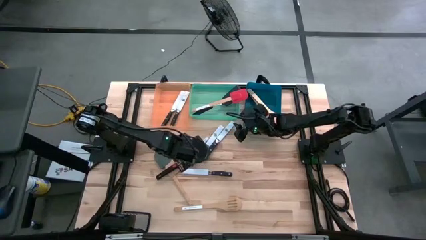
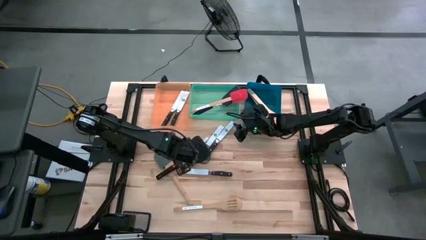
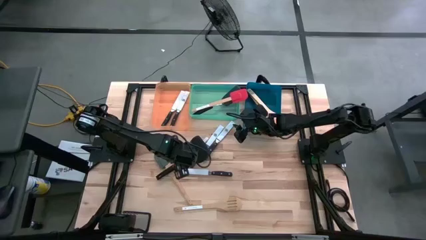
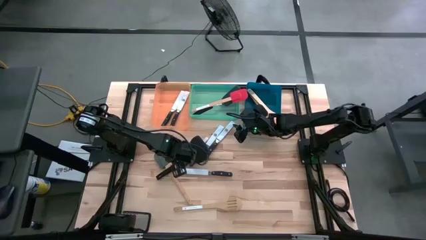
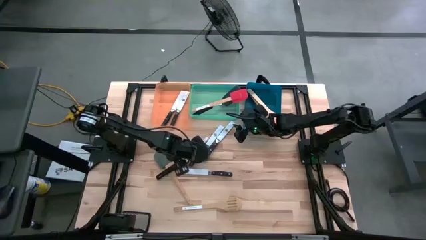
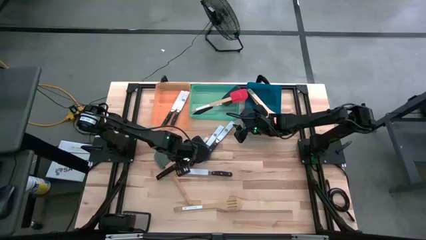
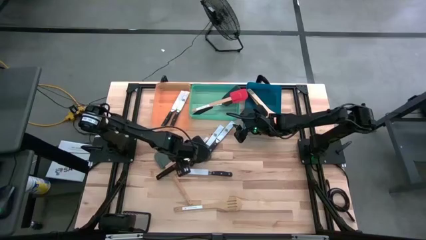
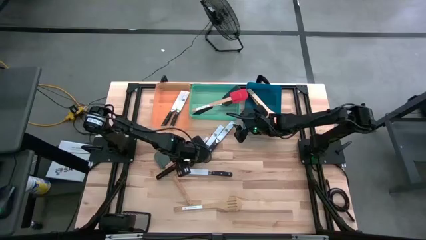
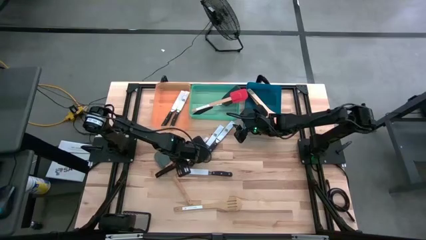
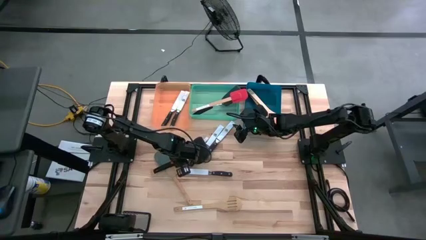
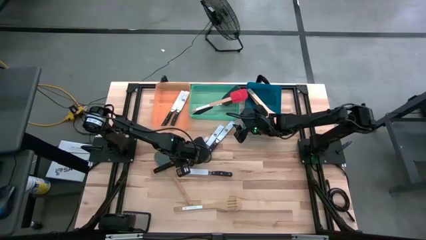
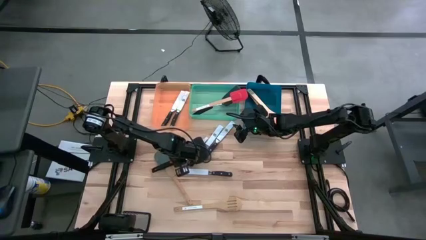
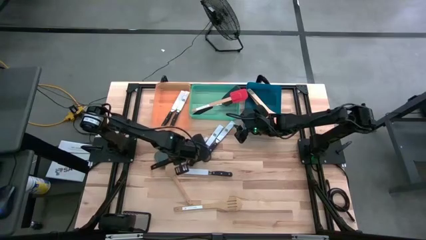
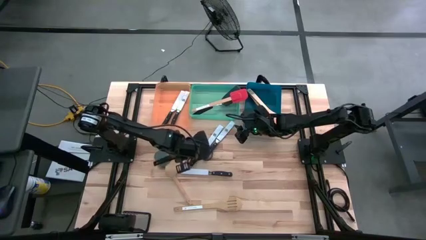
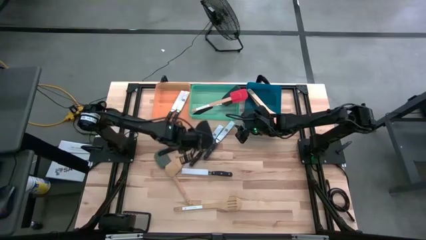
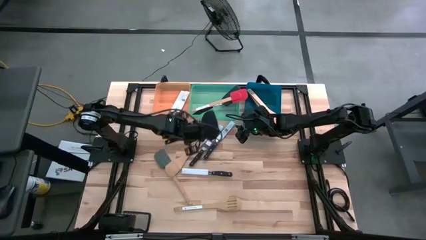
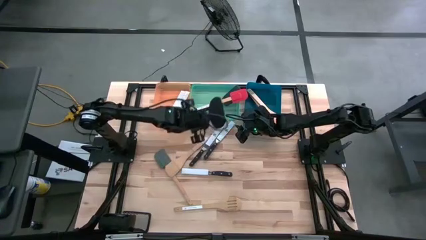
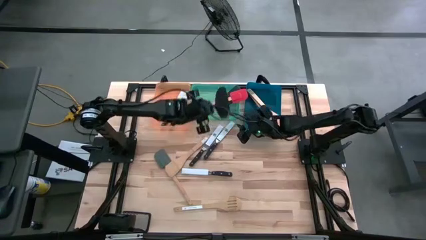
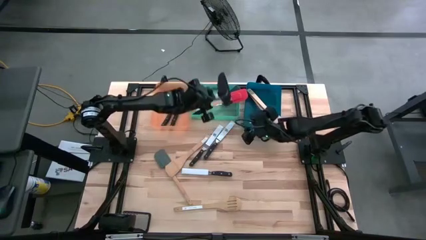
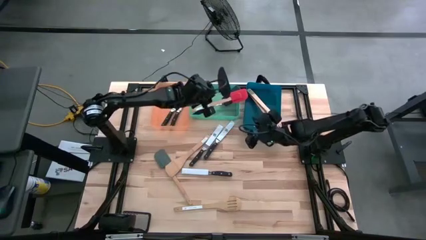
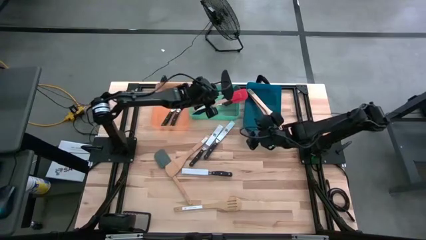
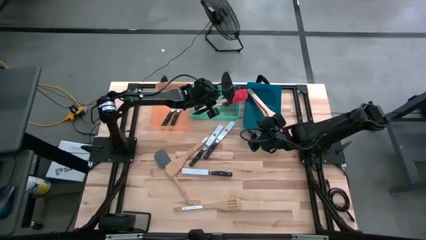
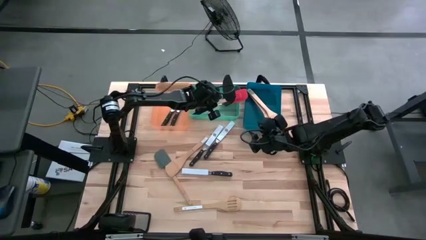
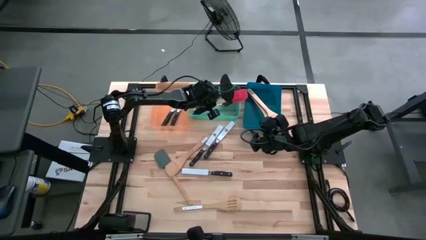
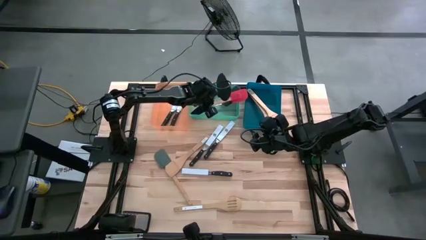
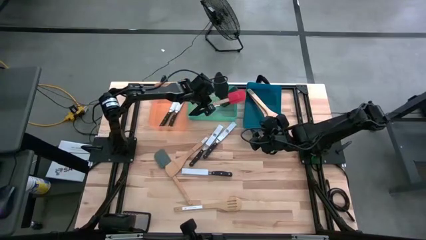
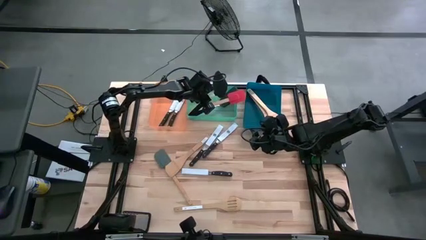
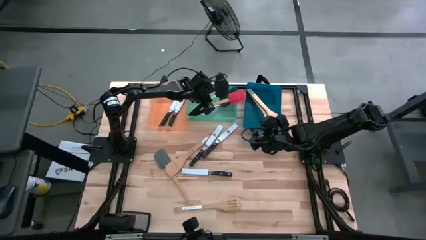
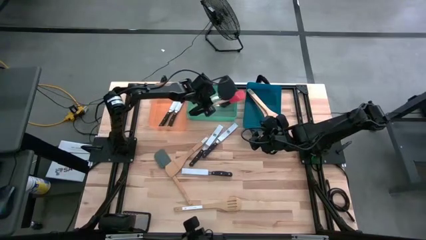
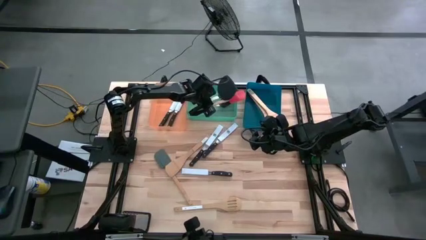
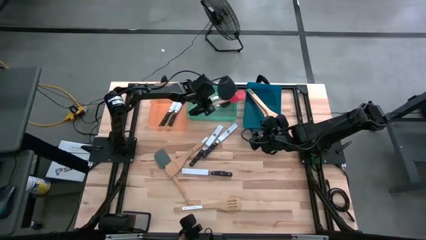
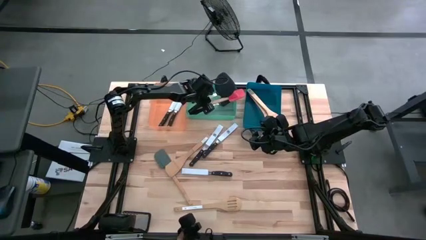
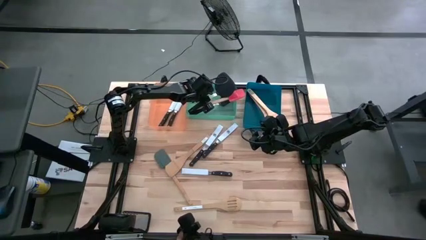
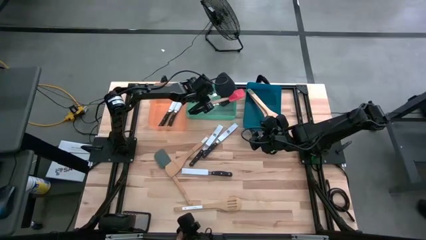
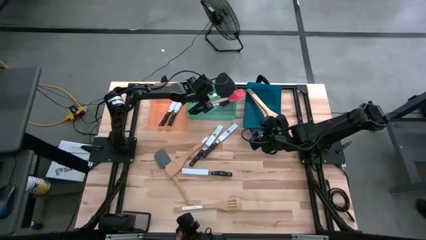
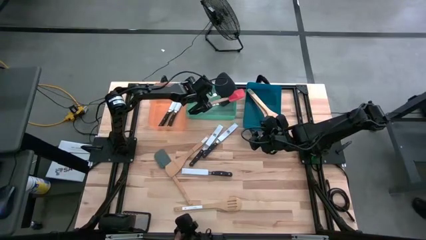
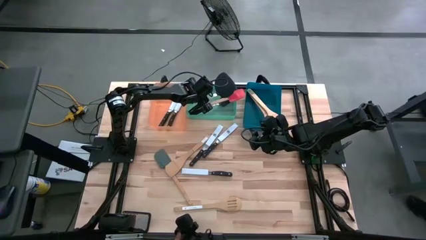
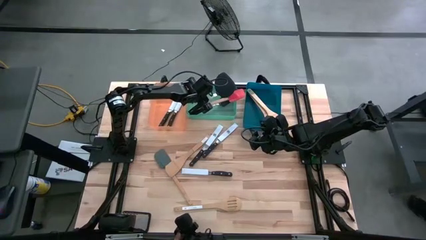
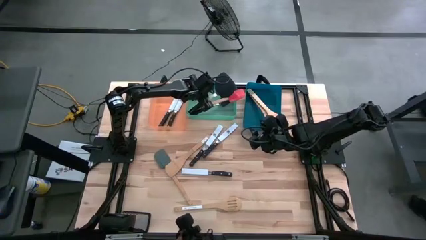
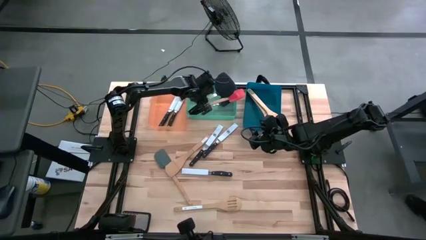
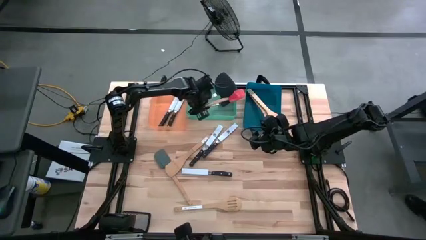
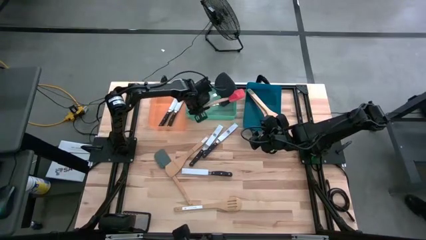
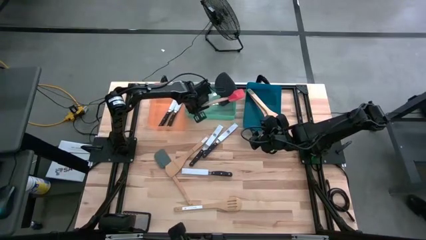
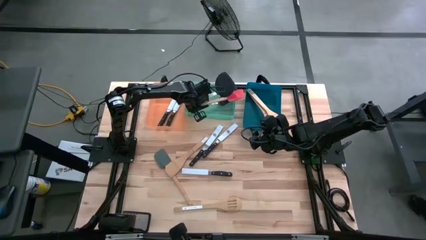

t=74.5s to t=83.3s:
Task: Pick & Place Kitchen Items
Put the black spatula into the green bin

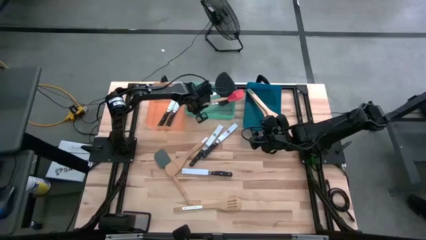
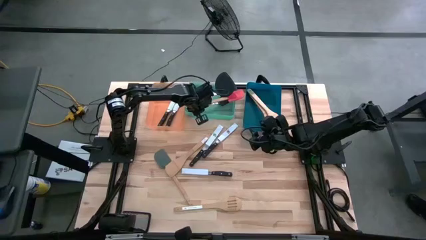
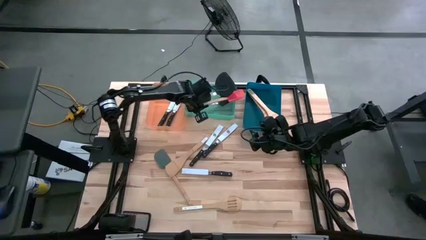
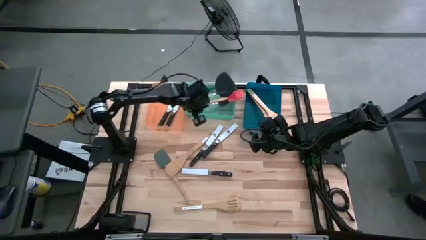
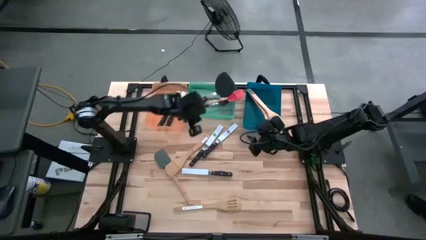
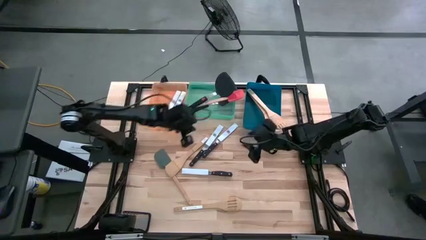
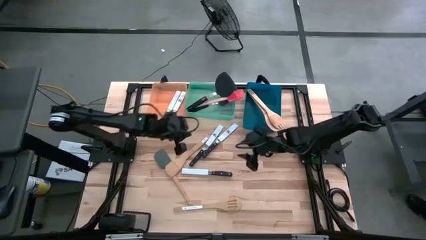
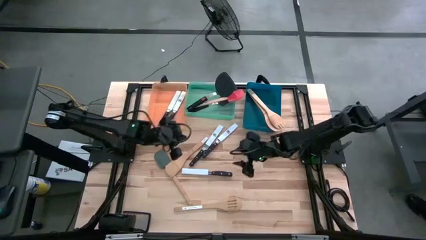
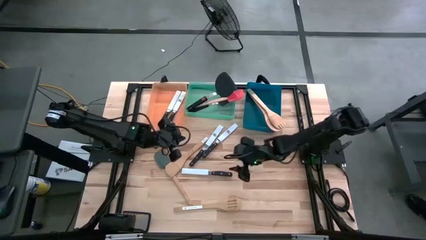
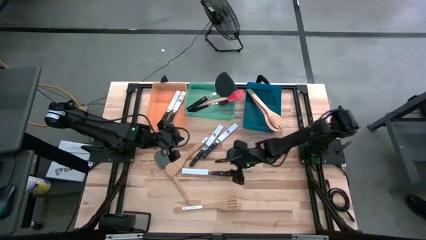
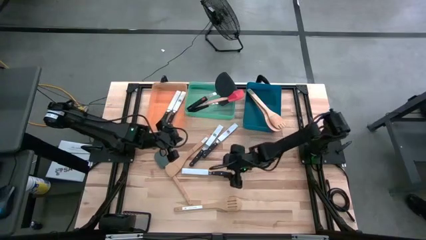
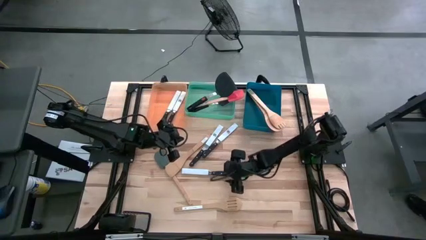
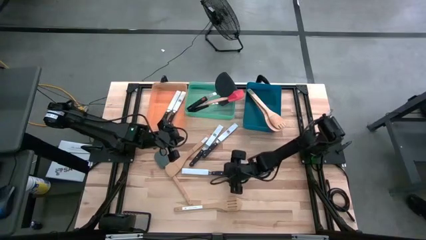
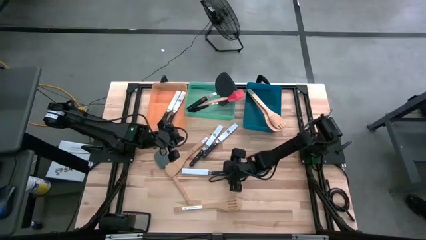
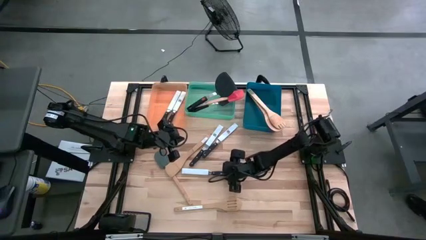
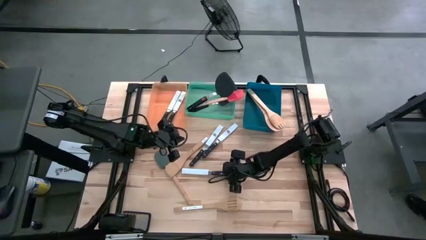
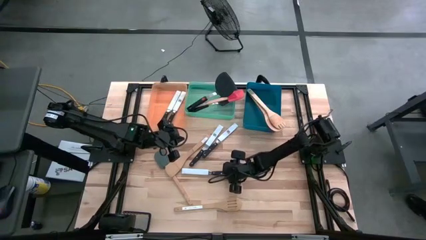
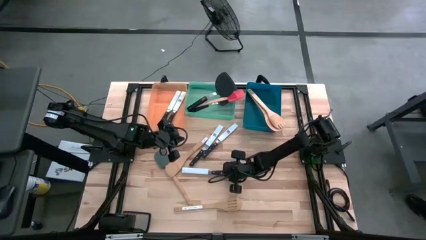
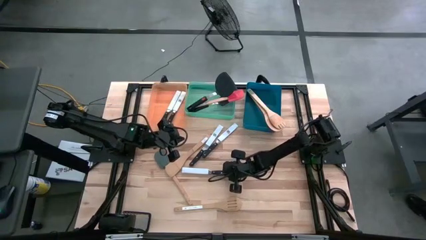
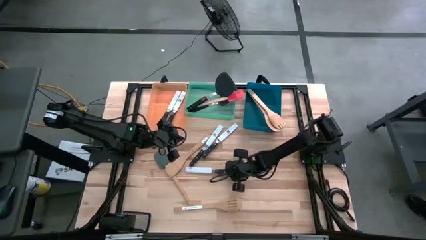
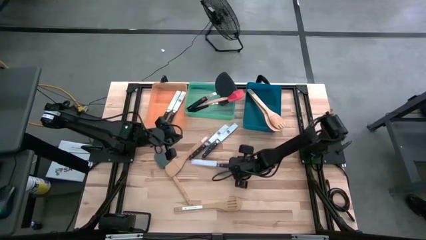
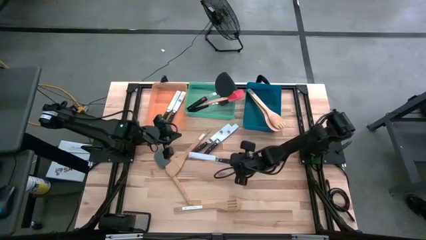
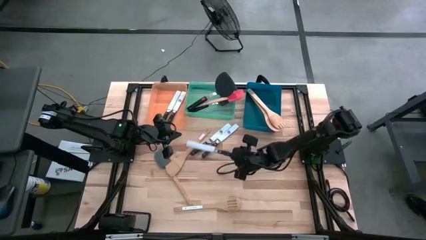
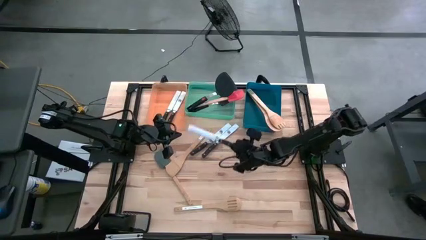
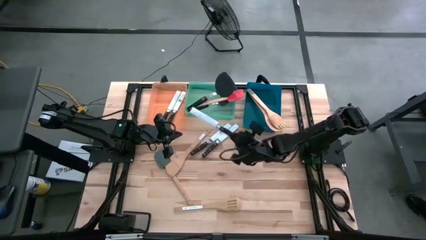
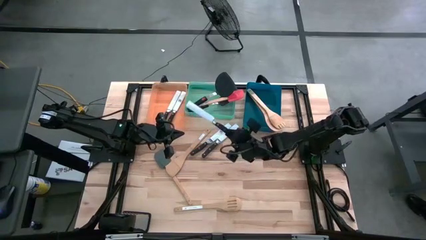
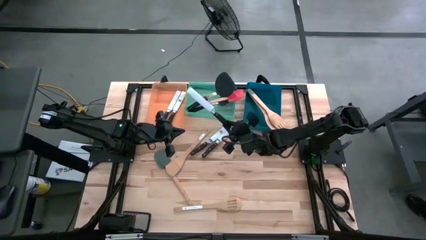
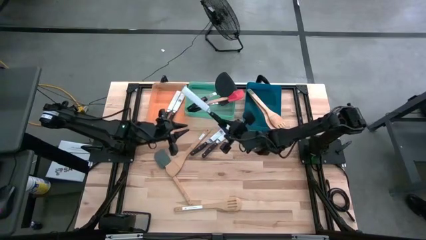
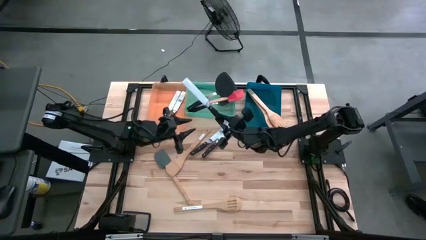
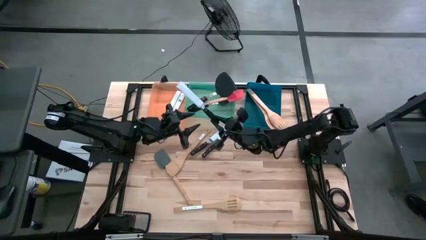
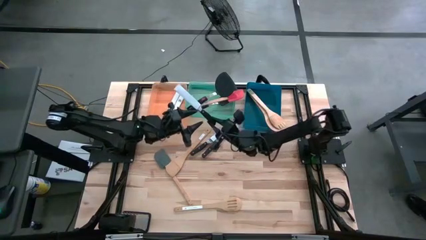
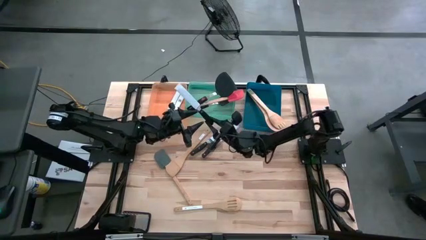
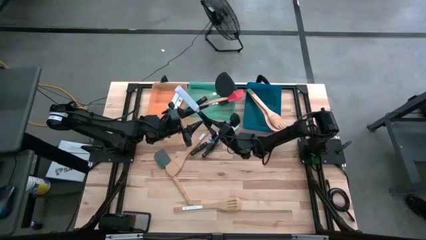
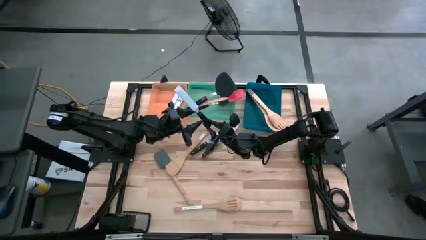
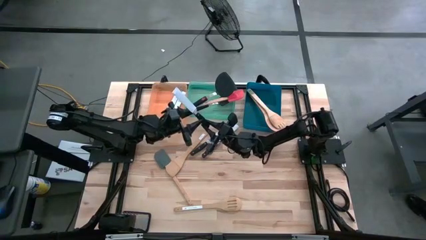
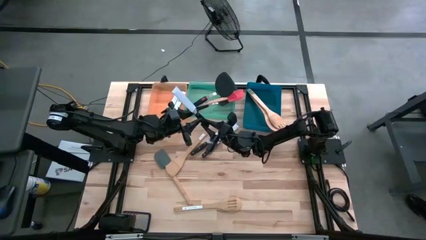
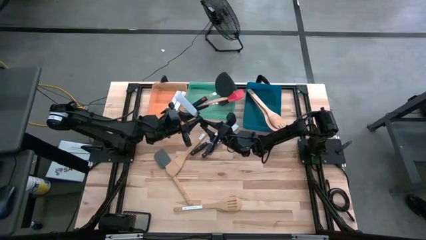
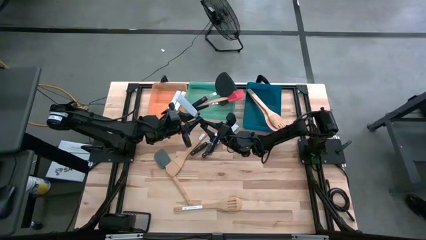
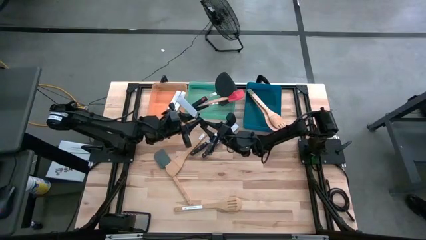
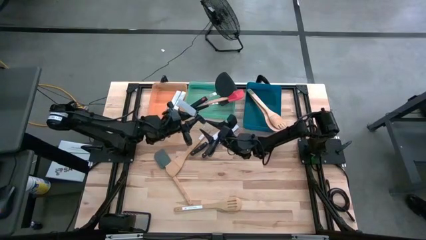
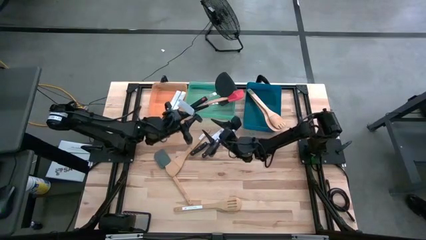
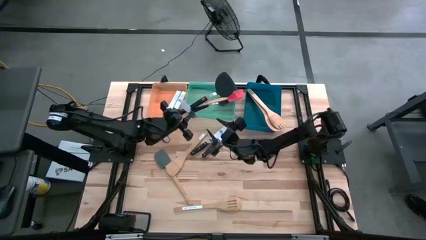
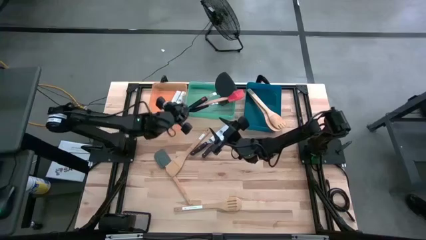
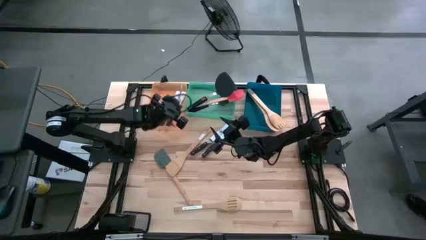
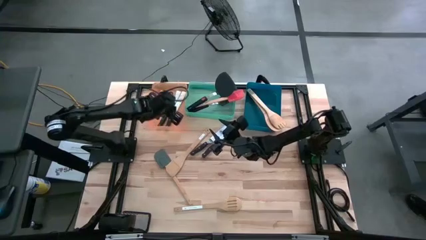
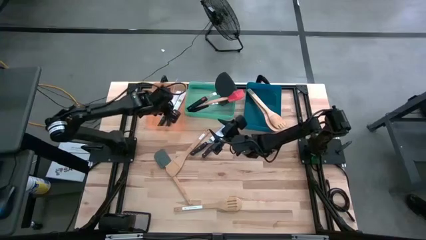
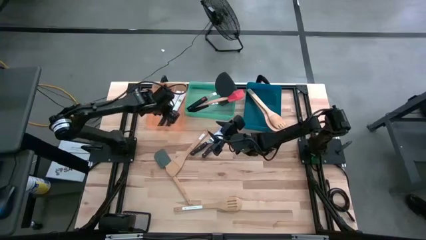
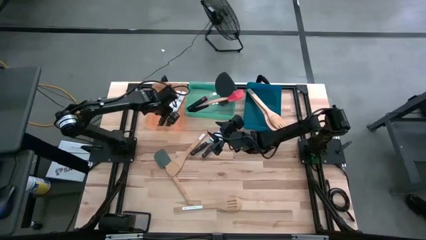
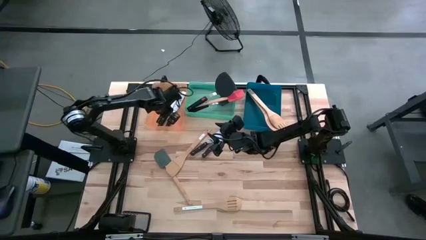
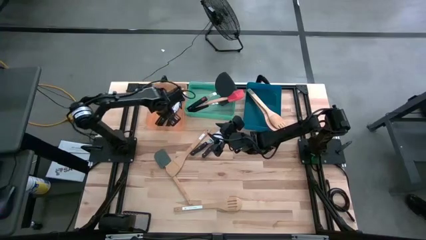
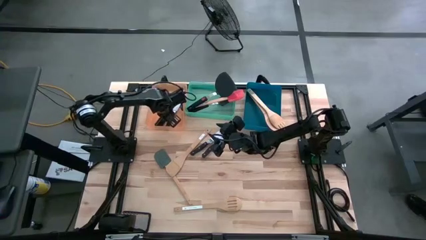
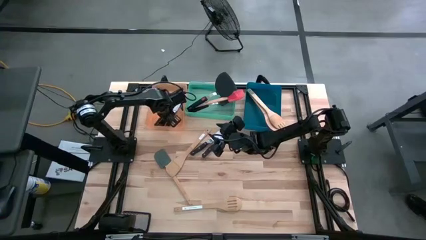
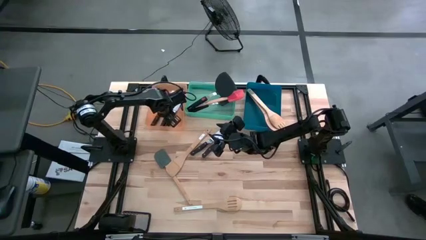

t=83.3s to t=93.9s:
Put the black knife into the orange bin
